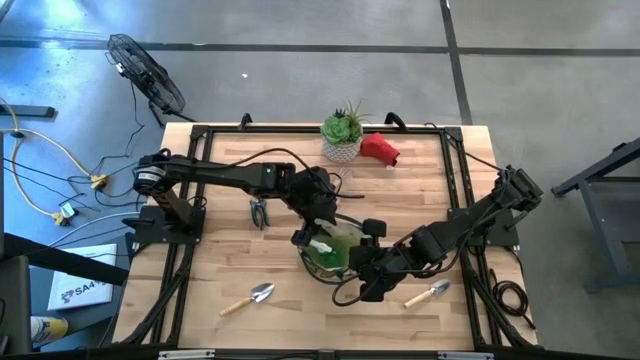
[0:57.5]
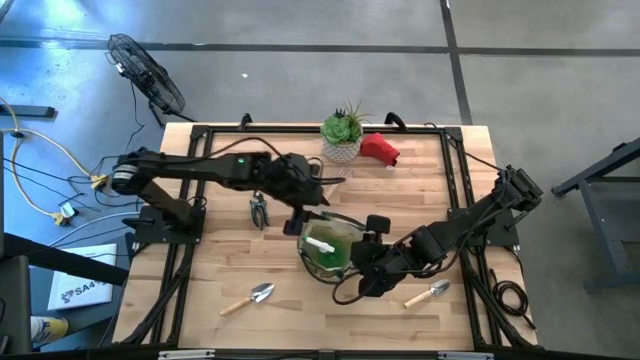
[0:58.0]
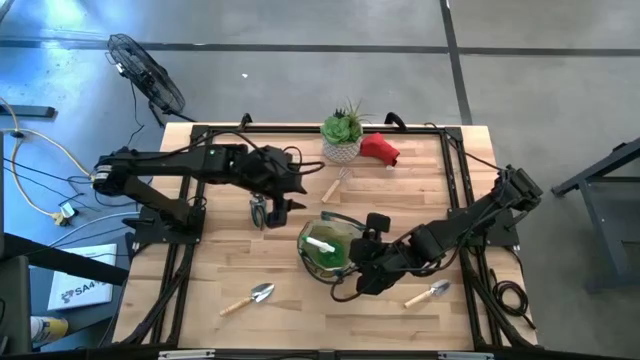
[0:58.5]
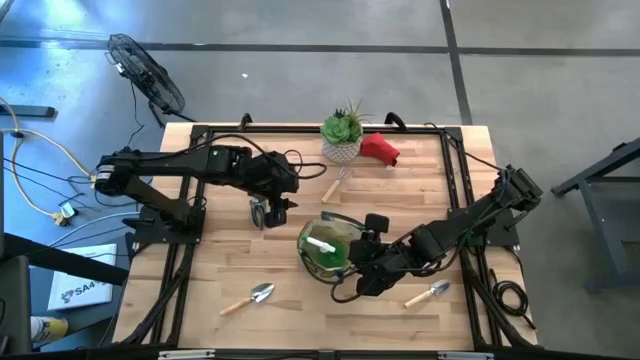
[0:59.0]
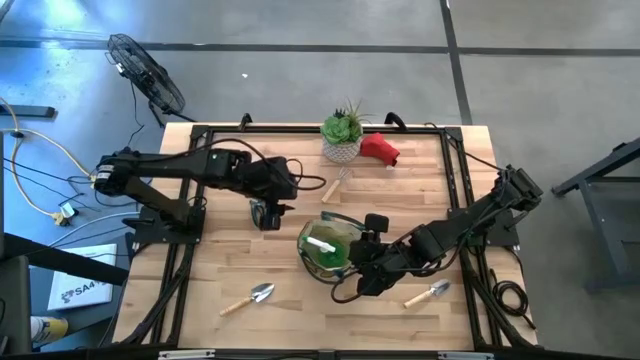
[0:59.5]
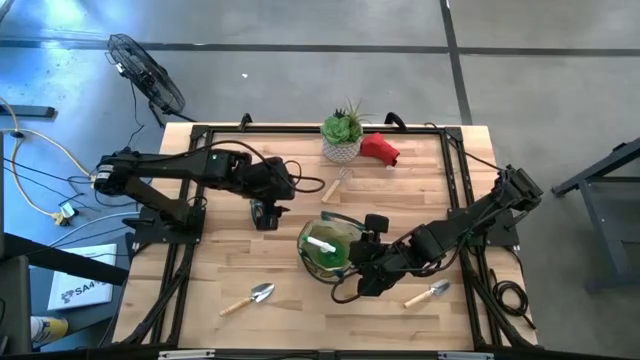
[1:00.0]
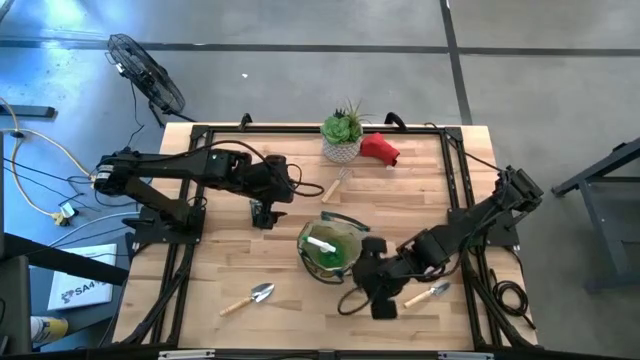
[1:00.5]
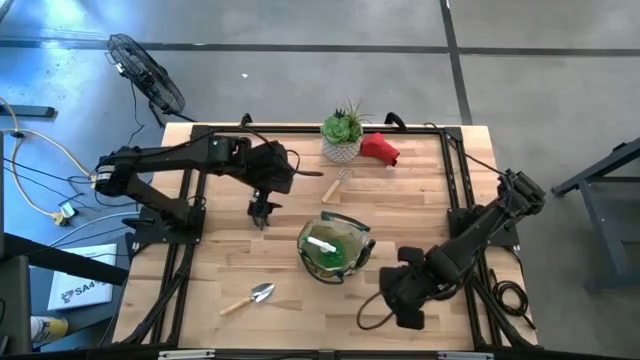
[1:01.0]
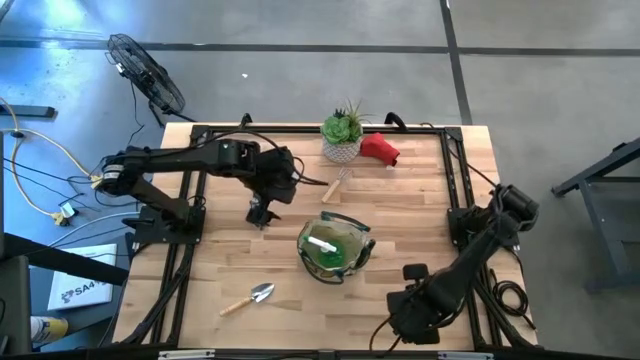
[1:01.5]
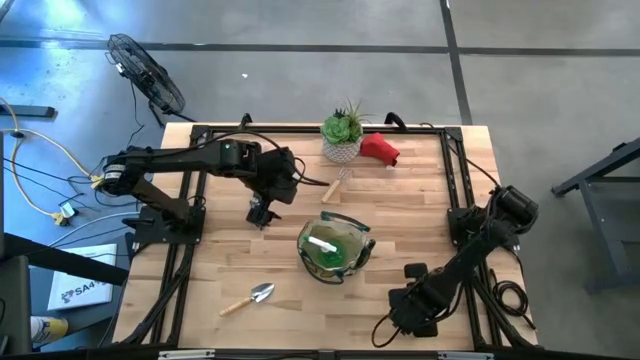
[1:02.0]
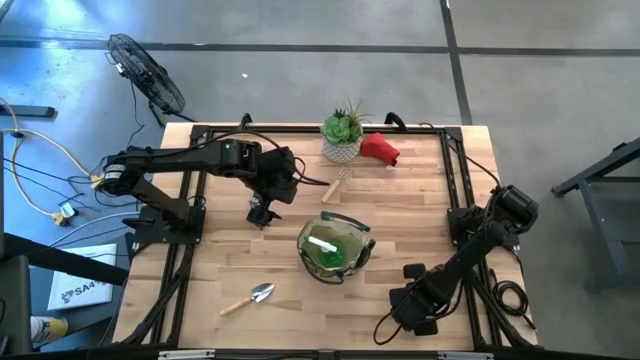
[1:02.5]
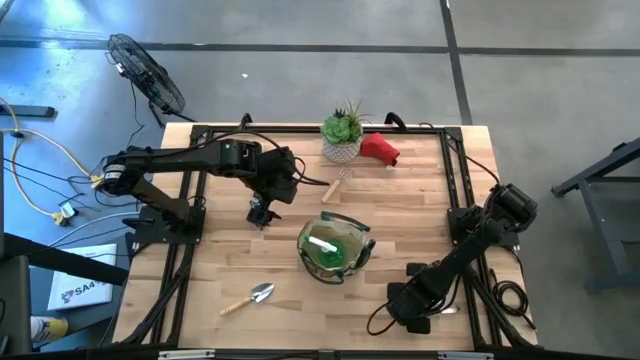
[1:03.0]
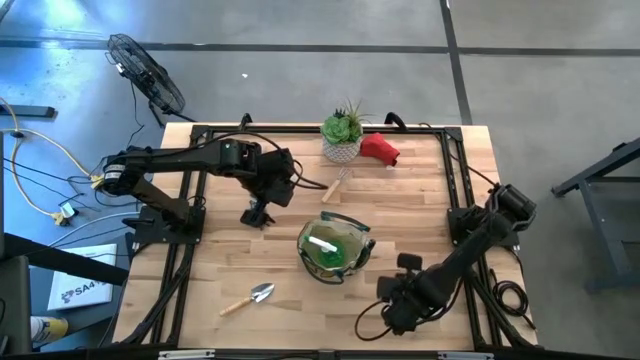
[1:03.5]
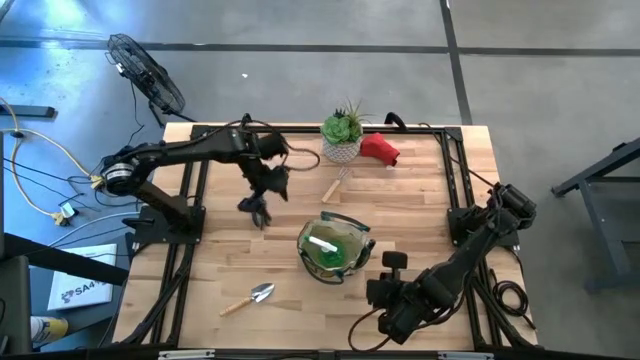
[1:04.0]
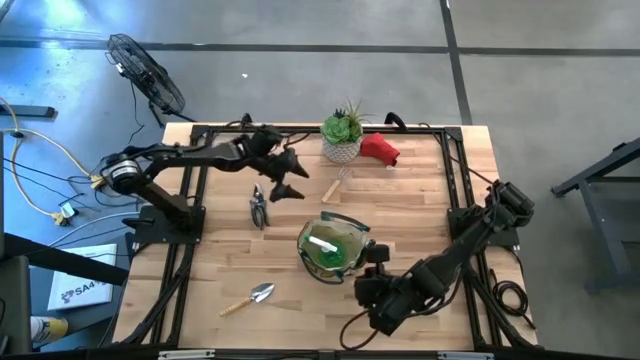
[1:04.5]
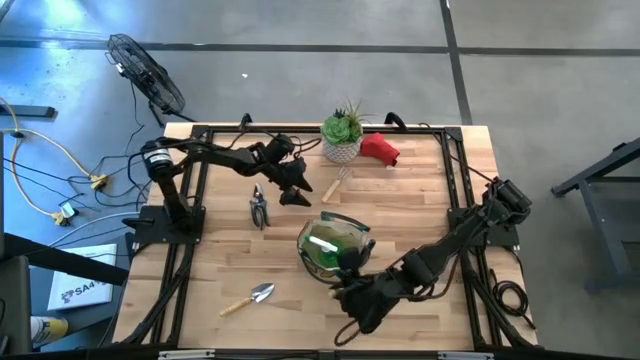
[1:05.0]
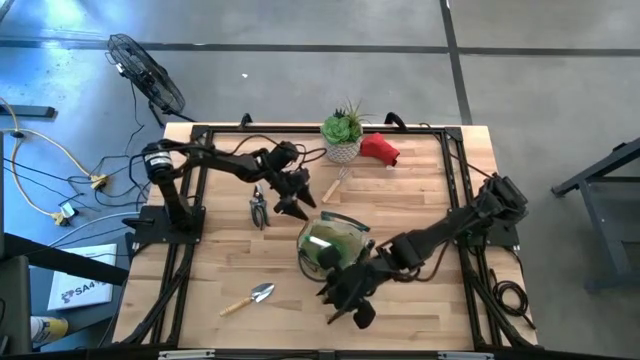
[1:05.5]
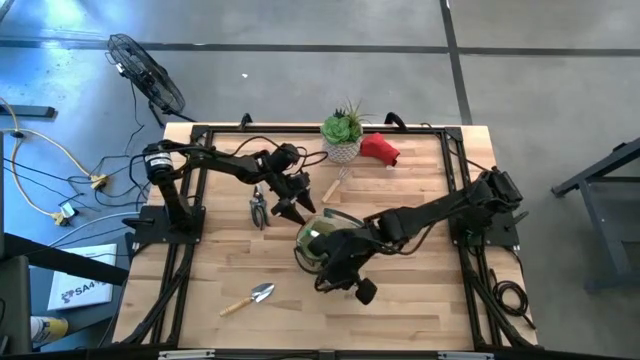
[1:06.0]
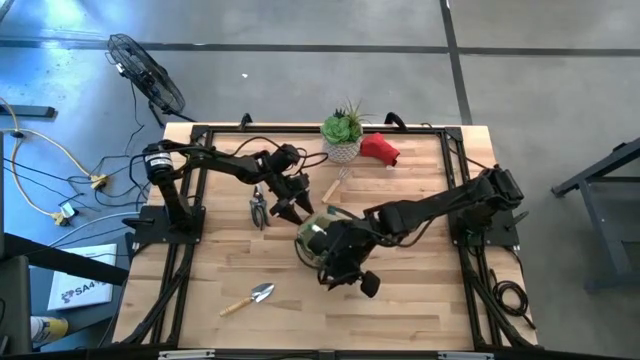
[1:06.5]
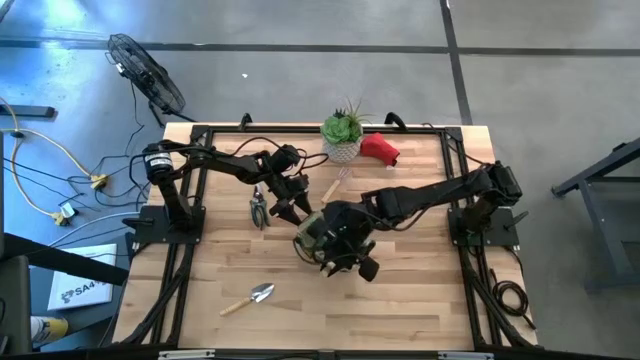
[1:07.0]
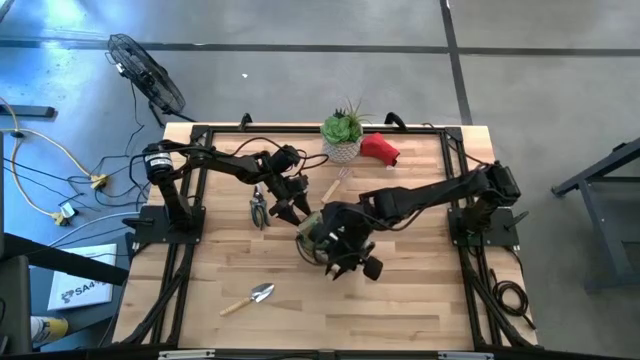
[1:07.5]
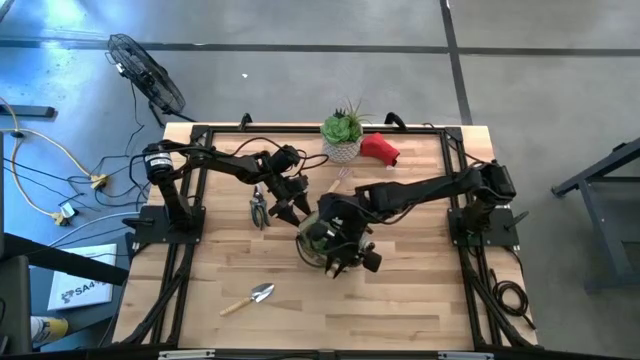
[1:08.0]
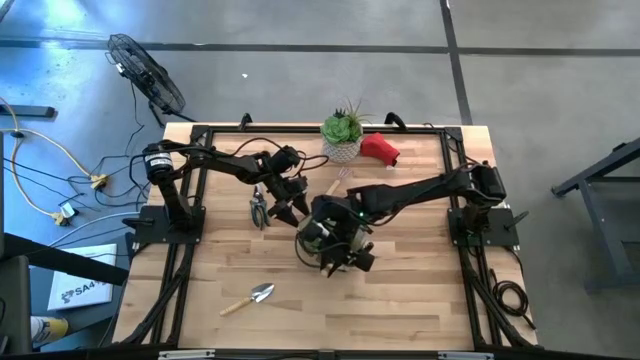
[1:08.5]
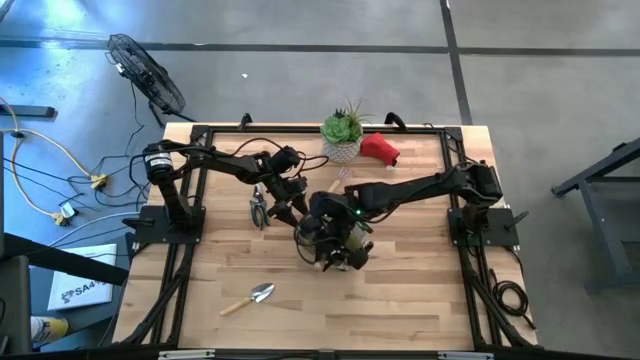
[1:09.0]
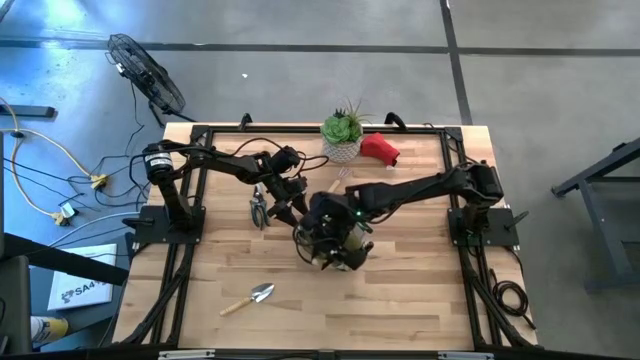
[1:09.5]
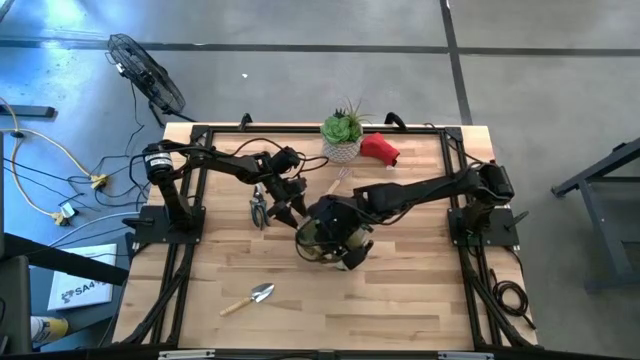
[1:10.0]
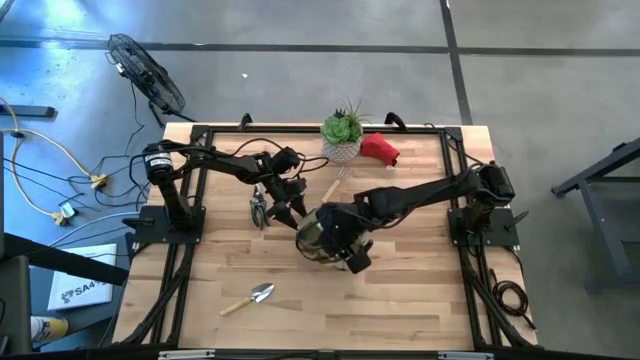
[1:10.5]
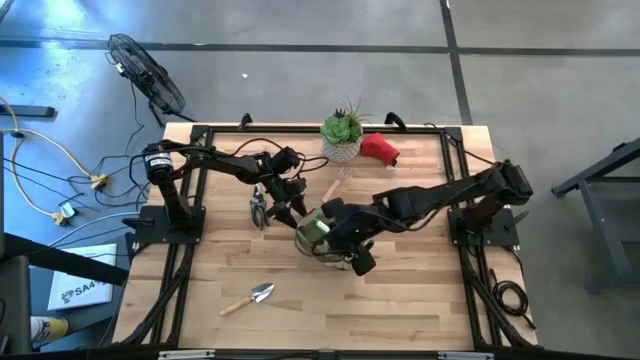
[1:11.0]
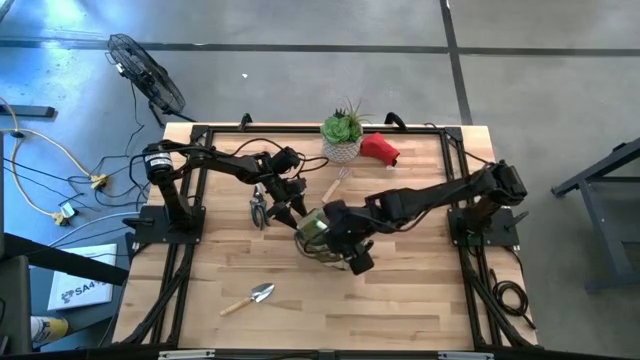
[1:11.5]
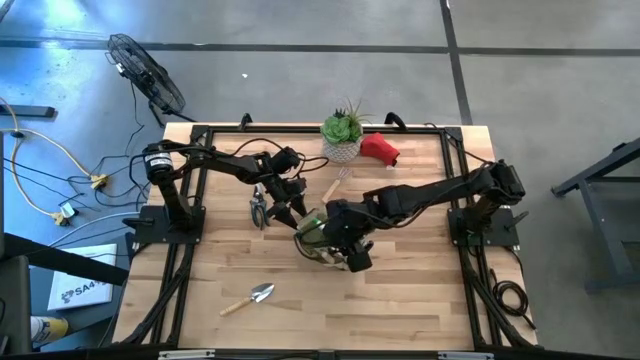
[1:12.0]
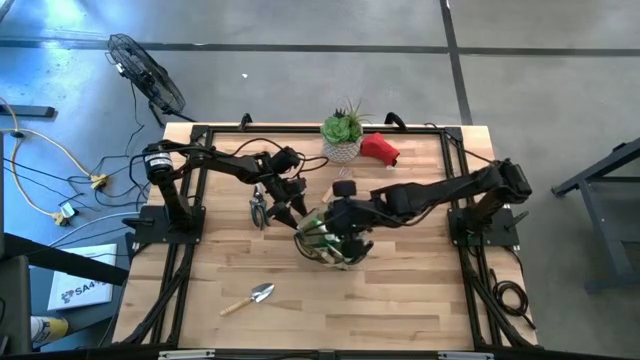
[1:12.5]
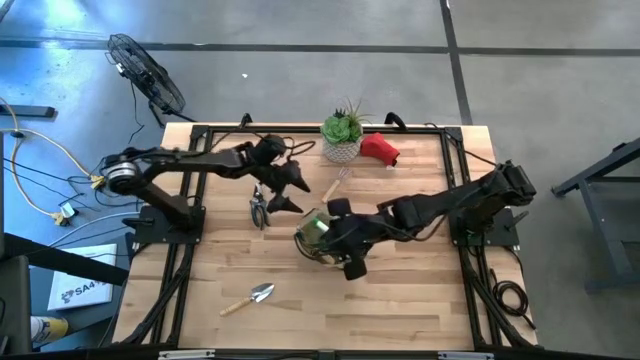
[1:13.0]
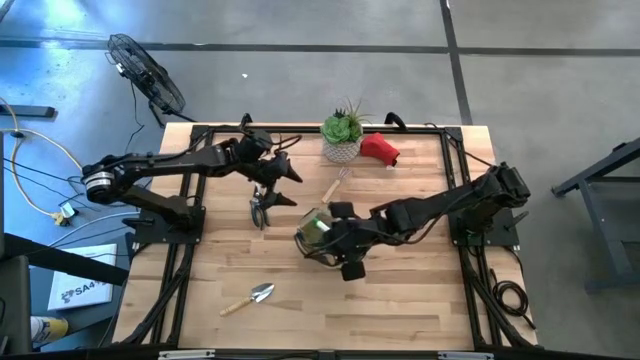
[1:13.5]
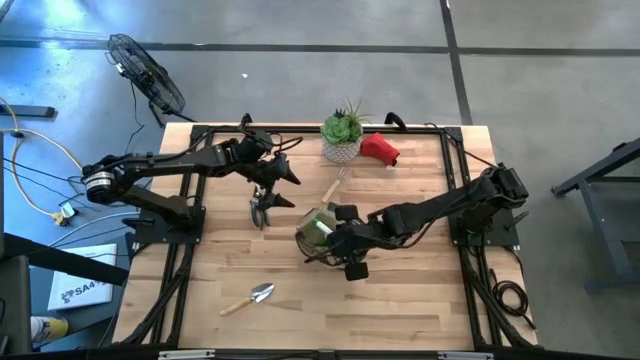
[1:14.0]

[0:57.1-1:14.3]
Task: Pick & Place Garden tools in Gardening bag
Put the right brown trowel into the gardening bag

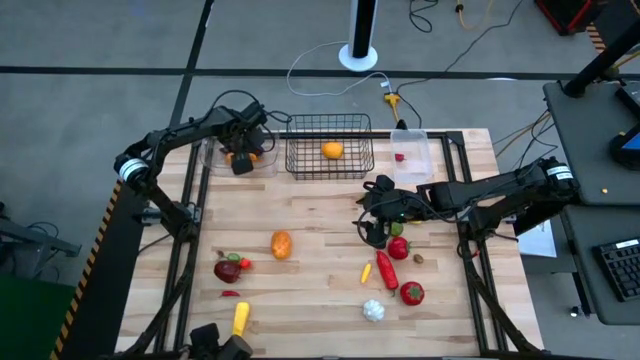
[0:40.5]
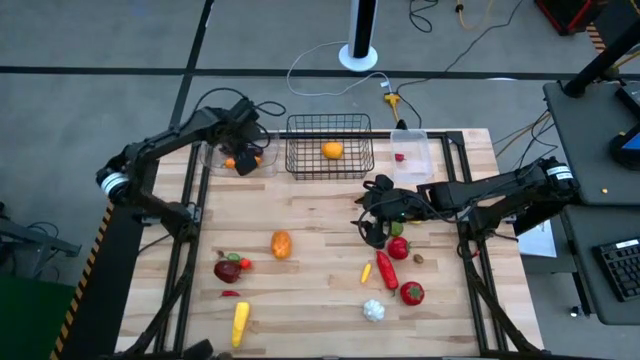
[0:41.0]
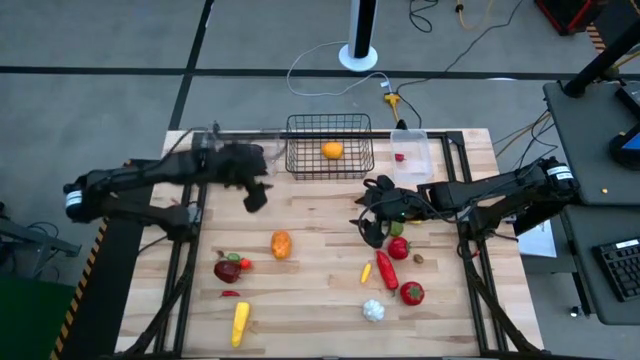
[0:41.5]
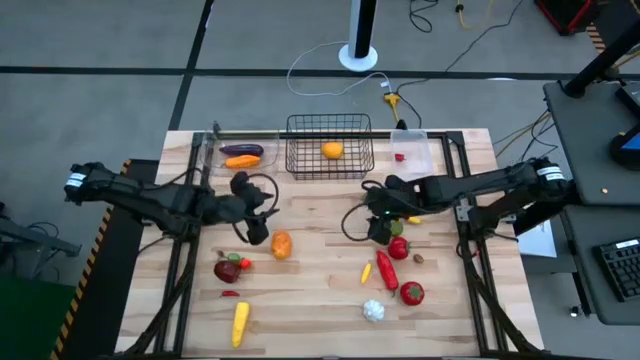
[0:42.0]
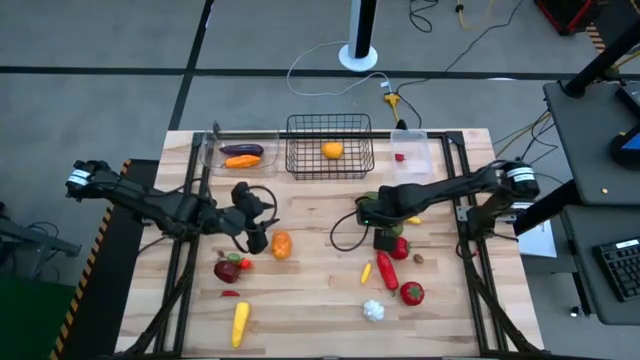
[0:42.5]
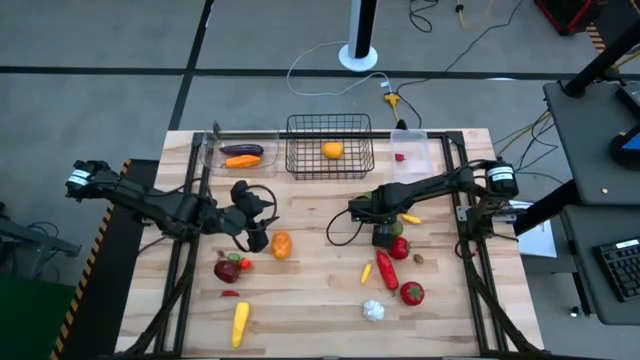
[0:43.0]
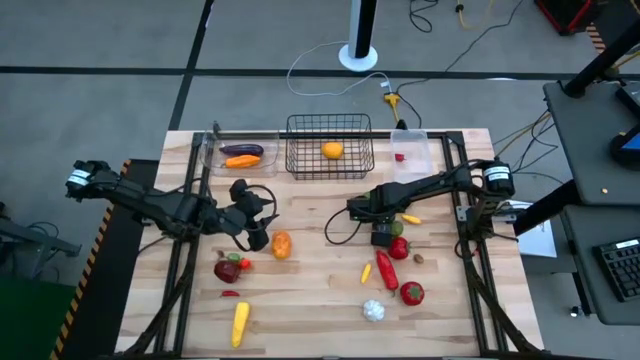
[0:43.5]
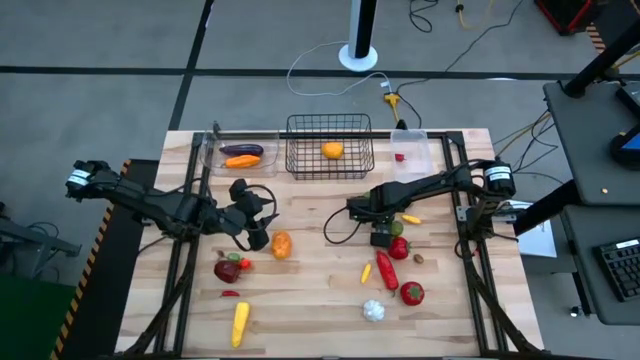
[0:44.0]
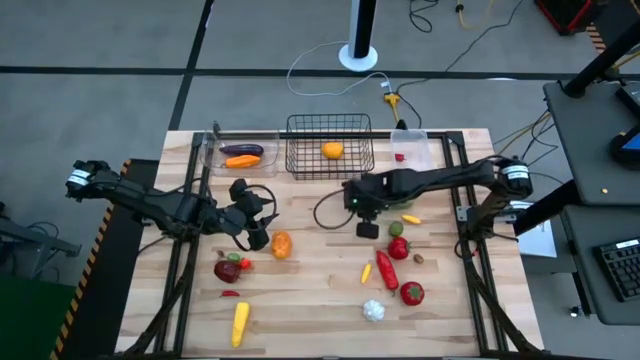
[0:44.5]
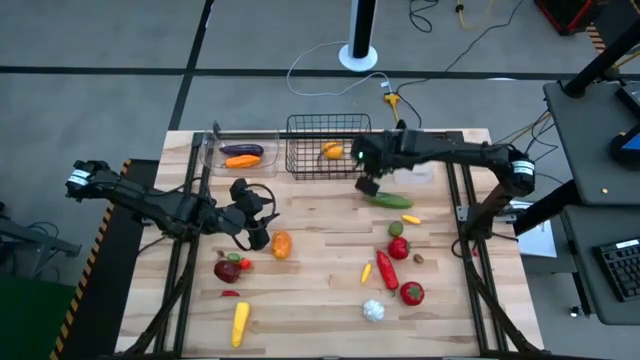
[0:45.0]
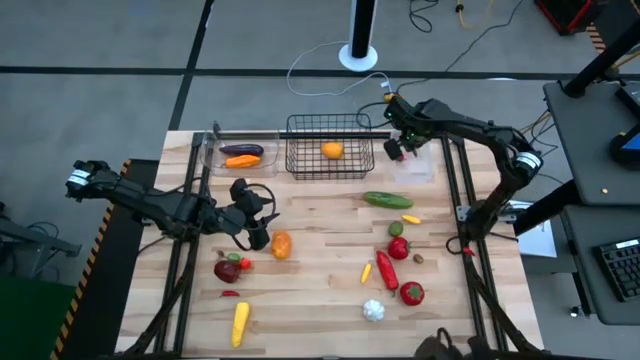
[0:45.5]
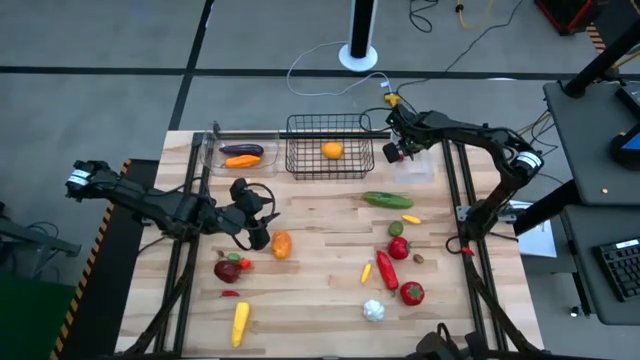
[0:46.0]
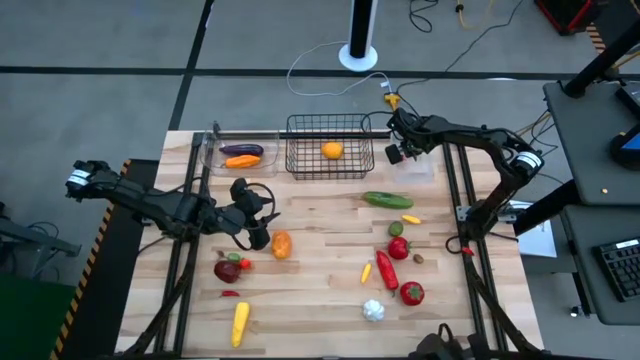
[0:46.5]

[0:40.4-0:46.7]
Task: Sort produce into baskets
Put the green jalapeno pepper into the white bin
